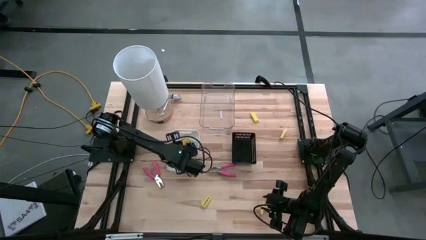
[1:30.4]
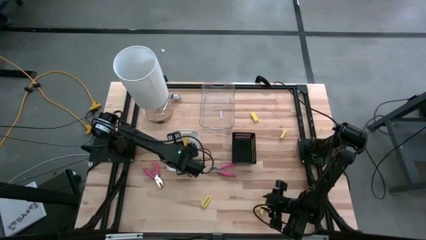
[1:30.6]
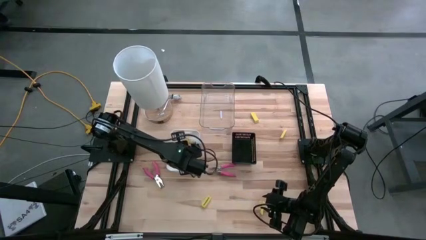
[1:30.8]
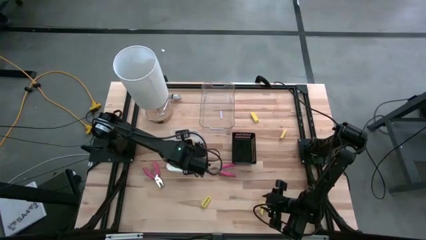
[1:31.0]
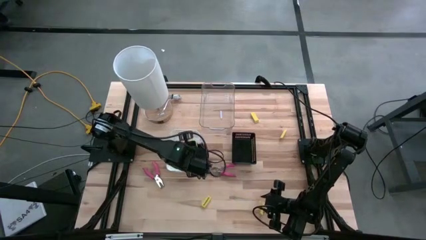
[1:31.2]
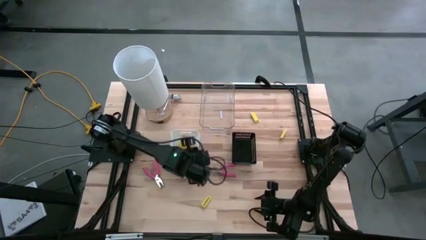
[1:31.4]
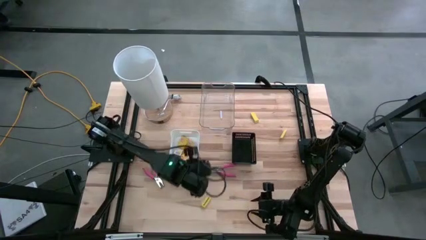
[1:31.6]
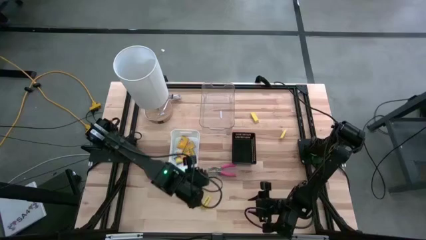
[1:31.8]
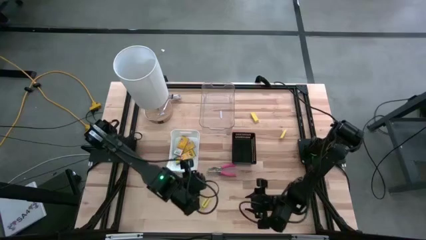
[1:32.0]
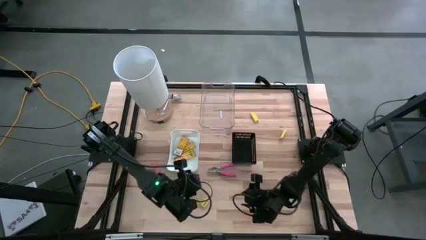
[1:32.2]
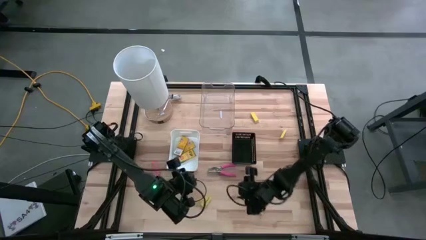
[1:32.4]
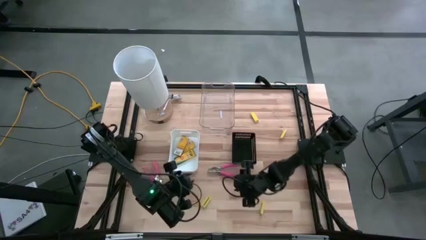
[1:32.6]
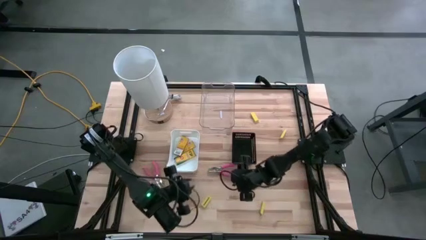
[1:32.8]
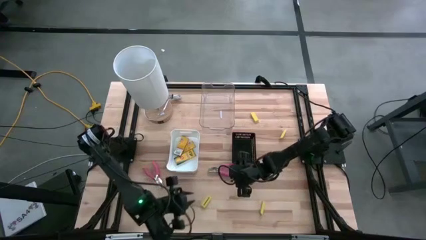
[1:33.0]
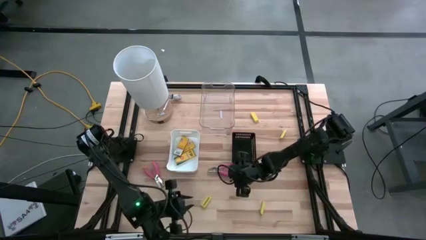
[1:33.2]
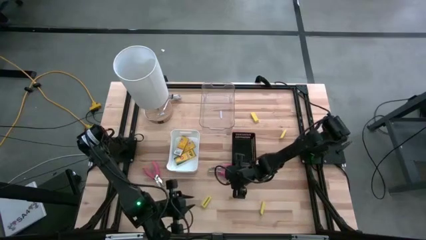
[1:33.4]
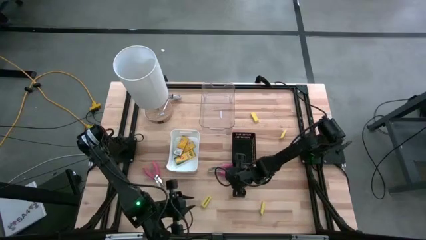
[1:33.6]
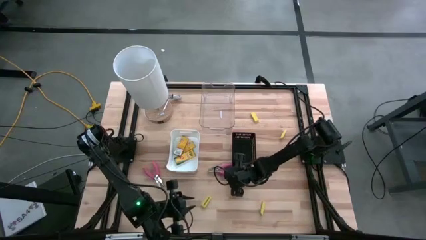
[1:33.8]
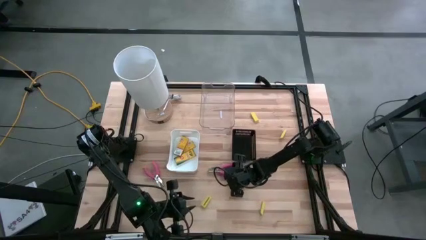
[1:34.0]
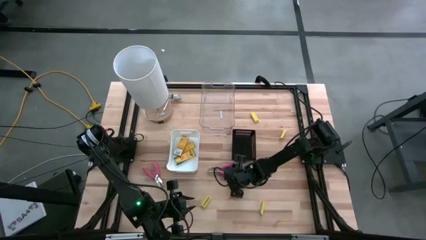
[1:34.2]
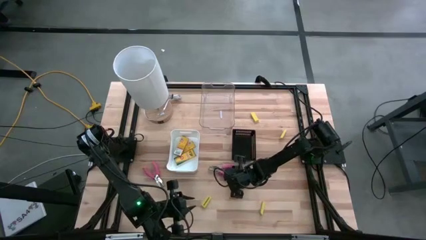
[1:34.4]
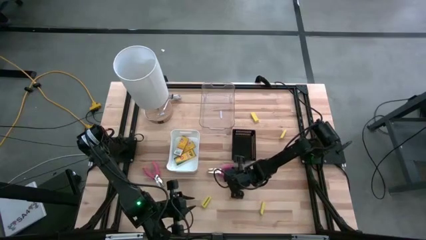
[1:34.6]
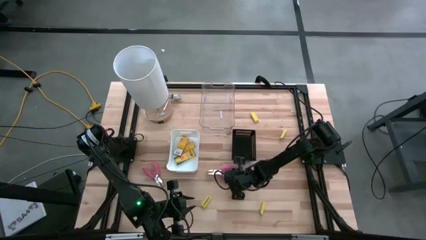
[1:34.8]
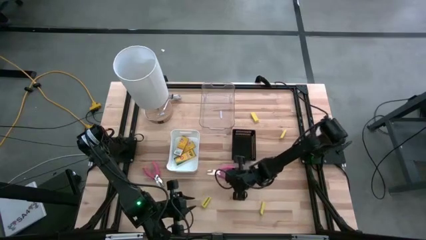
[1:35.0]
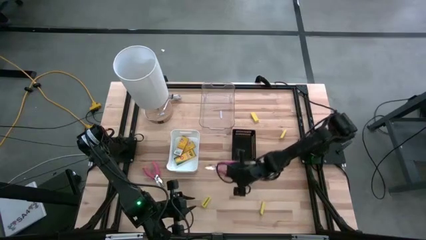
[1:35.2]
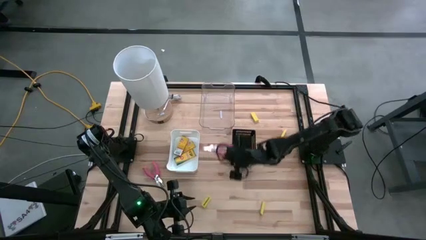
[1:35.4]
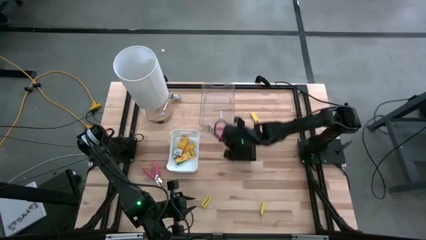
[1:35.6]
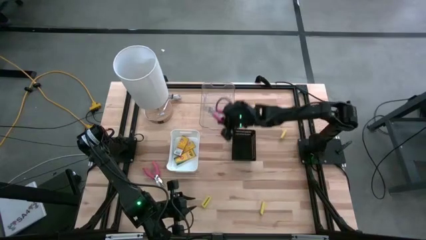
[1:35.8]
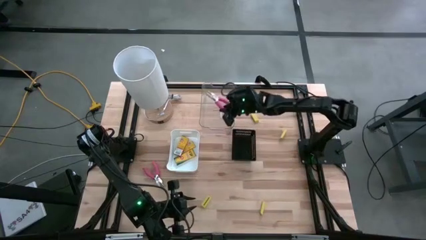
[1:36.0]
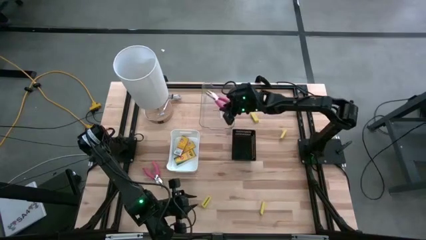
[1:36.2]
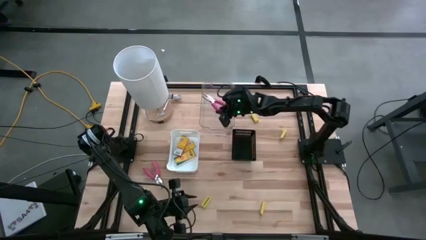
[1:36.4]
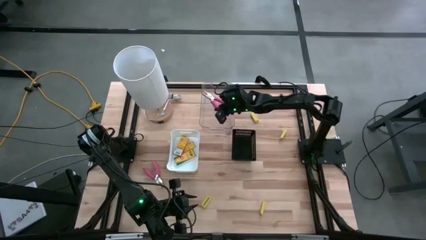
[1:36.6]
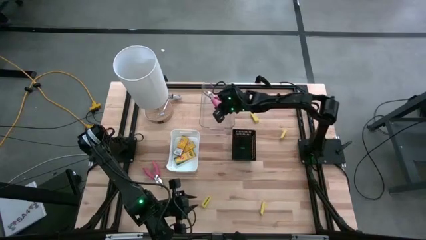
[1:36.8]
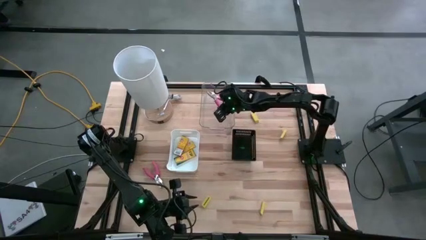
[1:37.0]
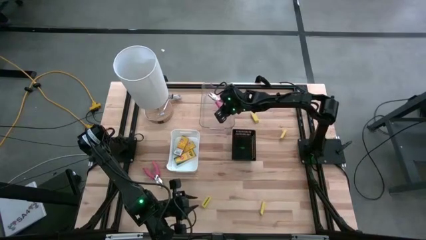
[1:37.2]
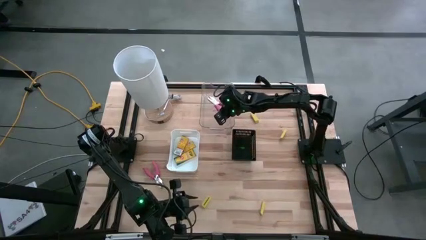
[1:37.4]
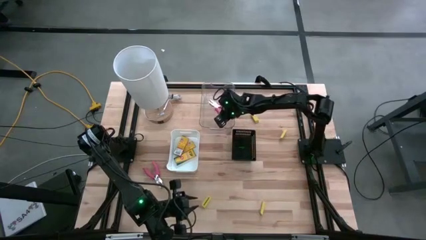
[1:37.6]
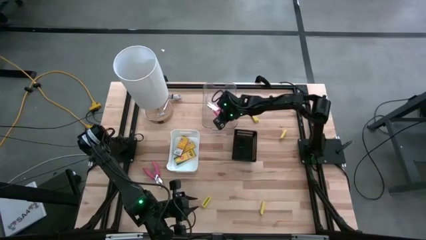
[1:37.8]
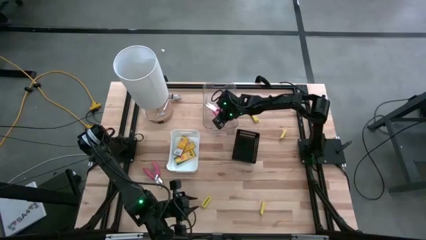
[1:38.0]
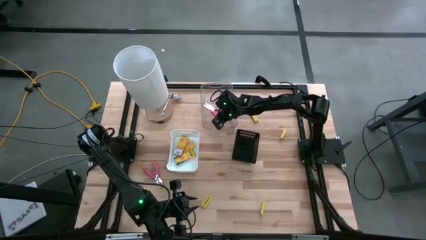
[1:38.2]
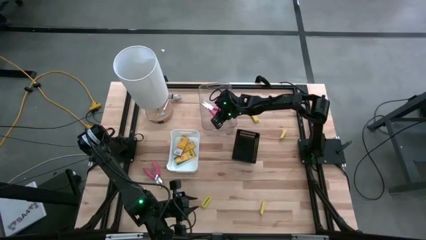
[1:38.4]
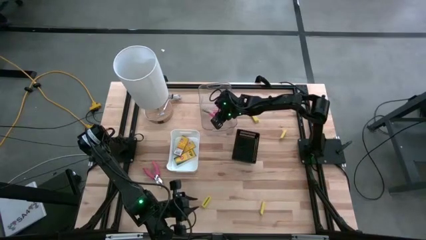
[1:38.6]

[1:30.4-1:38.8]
Task: Pick & Place School Supplies
Put the right hole puncher into the transparent bin

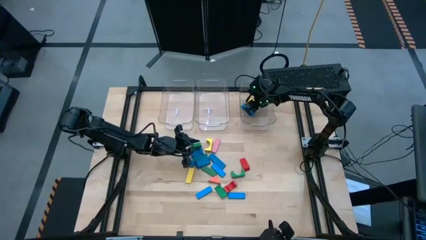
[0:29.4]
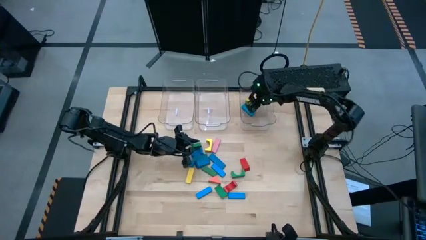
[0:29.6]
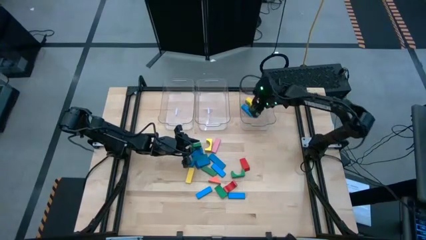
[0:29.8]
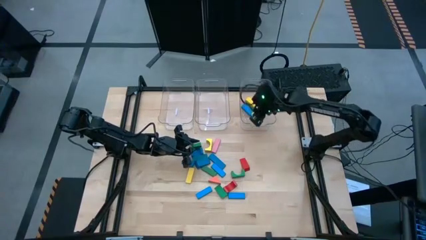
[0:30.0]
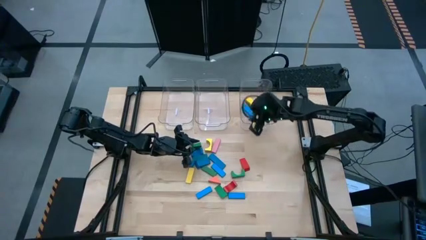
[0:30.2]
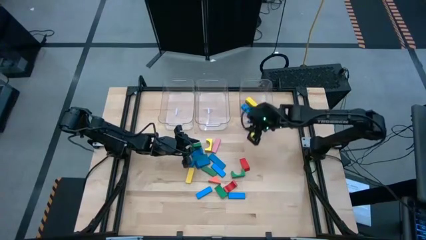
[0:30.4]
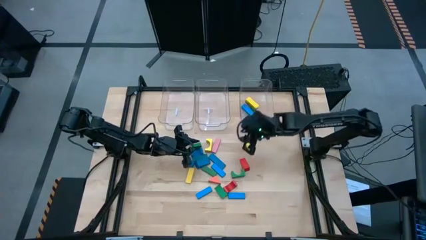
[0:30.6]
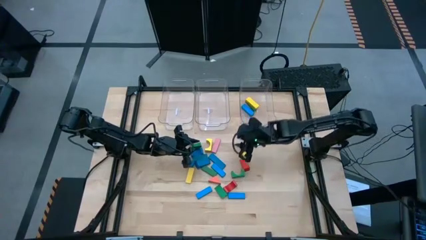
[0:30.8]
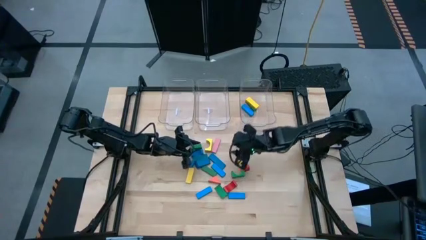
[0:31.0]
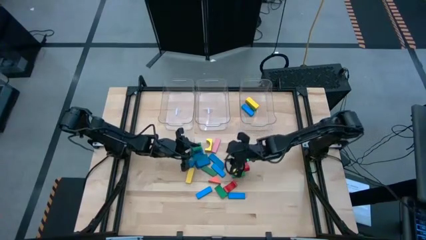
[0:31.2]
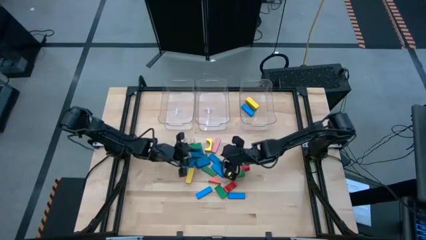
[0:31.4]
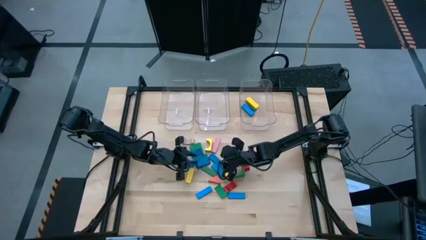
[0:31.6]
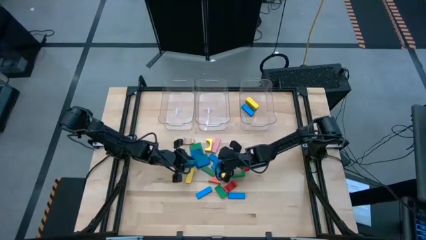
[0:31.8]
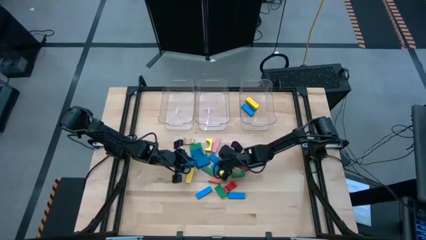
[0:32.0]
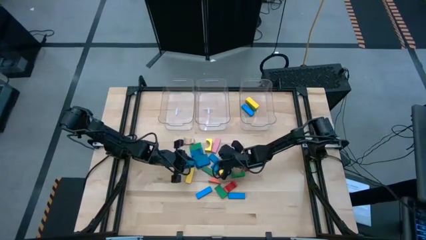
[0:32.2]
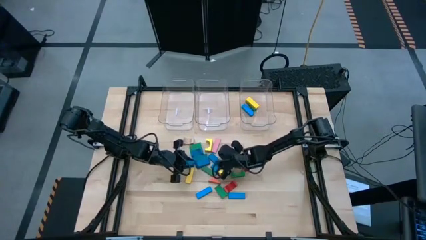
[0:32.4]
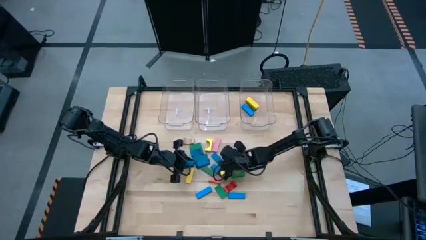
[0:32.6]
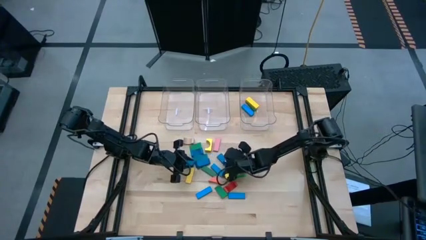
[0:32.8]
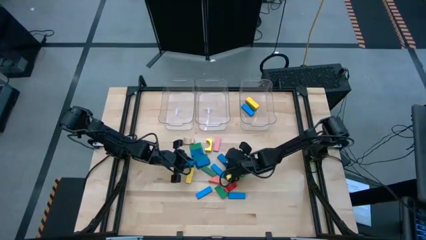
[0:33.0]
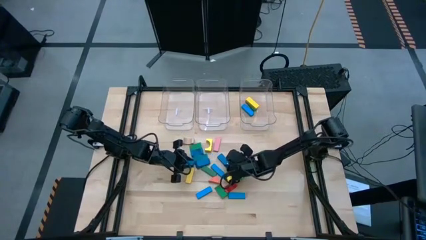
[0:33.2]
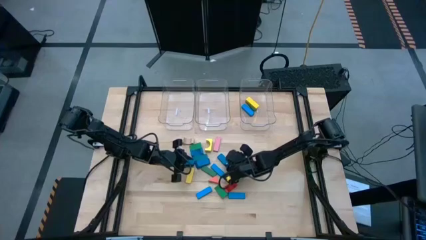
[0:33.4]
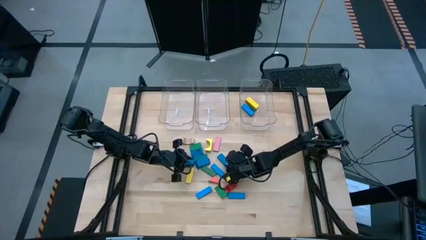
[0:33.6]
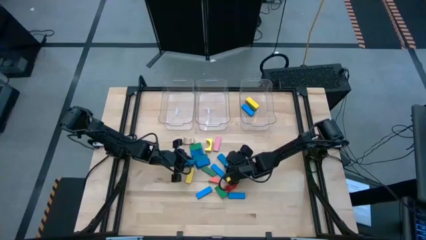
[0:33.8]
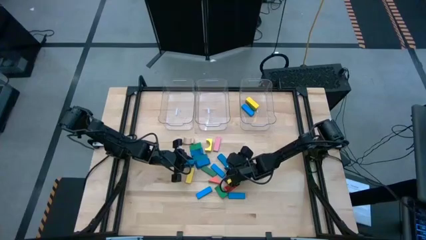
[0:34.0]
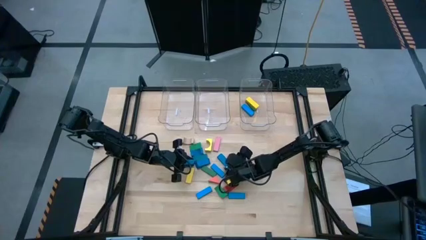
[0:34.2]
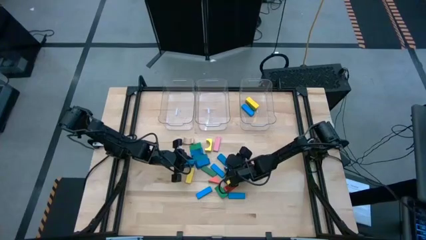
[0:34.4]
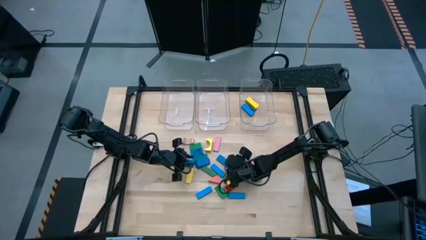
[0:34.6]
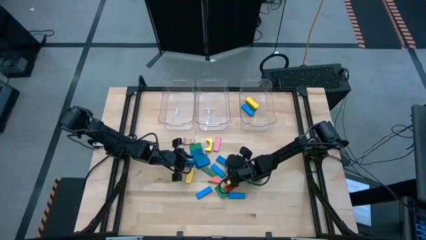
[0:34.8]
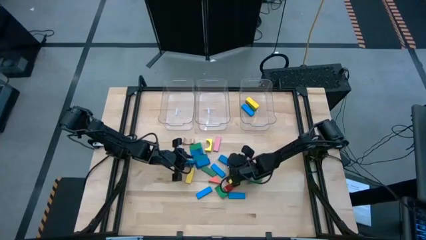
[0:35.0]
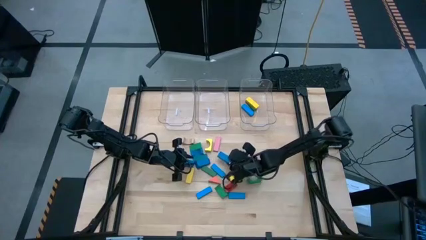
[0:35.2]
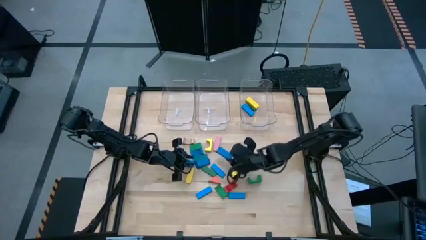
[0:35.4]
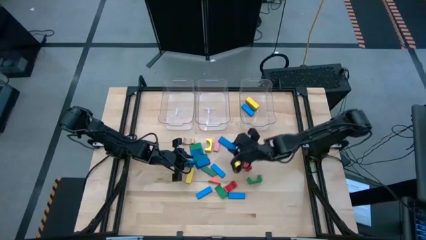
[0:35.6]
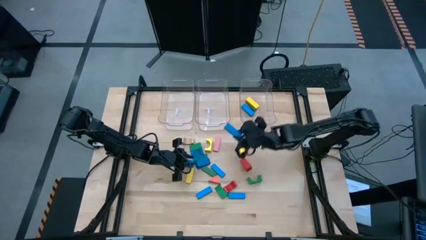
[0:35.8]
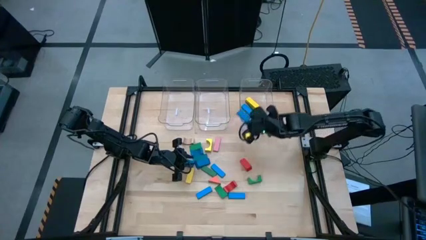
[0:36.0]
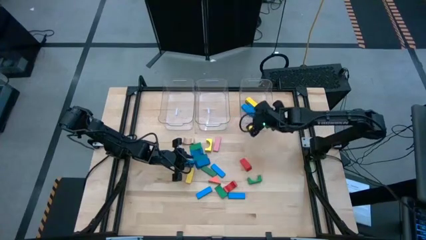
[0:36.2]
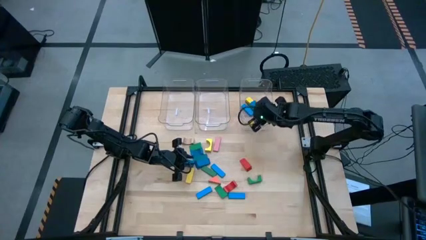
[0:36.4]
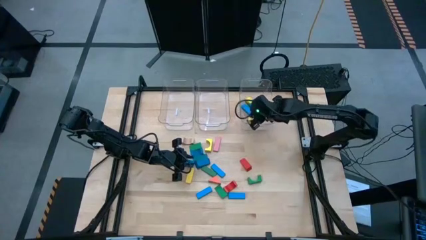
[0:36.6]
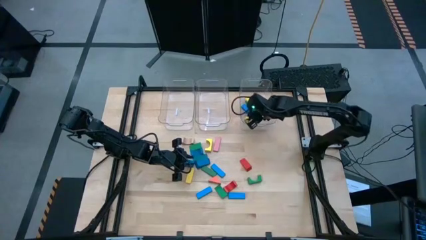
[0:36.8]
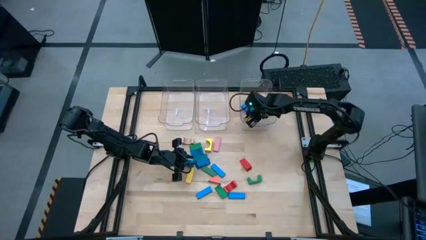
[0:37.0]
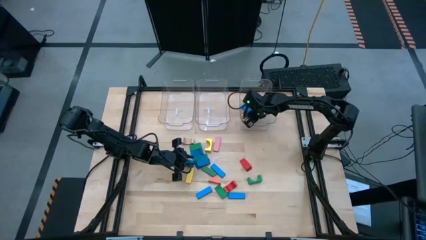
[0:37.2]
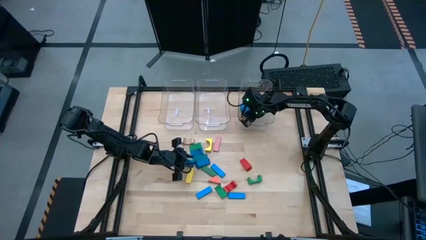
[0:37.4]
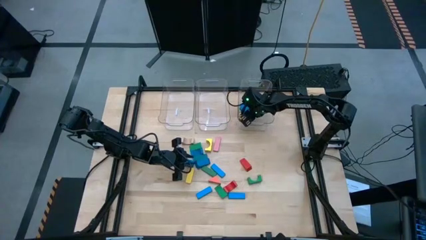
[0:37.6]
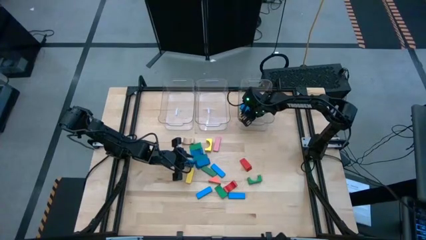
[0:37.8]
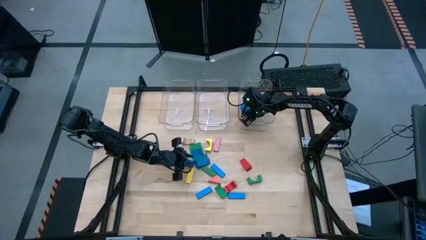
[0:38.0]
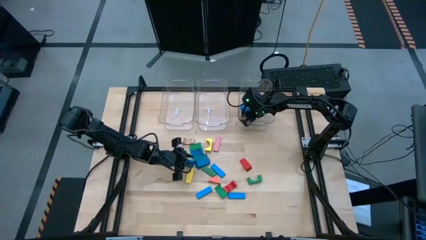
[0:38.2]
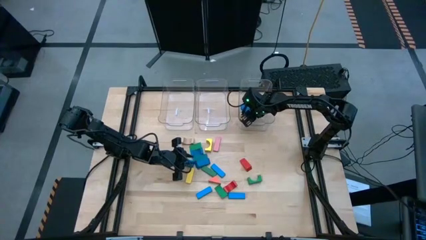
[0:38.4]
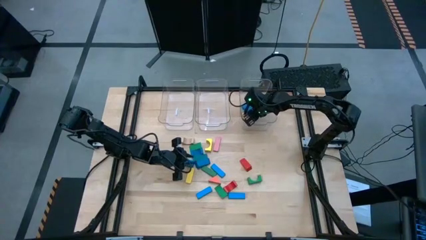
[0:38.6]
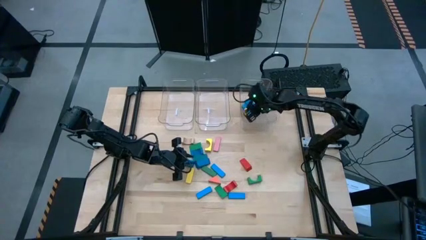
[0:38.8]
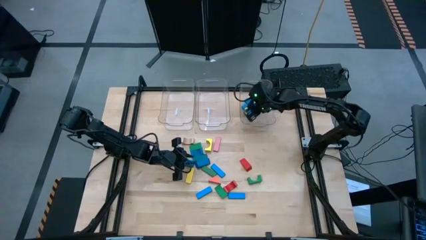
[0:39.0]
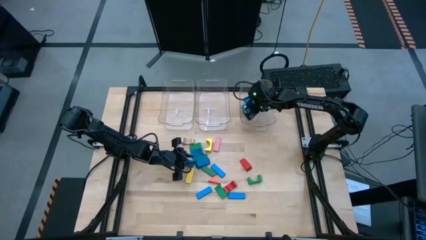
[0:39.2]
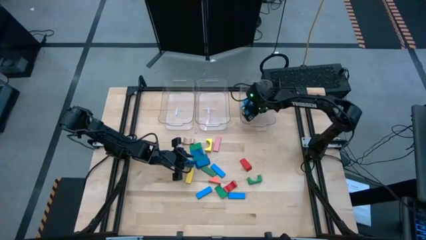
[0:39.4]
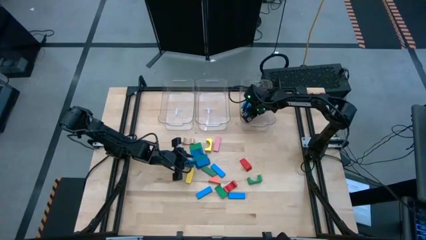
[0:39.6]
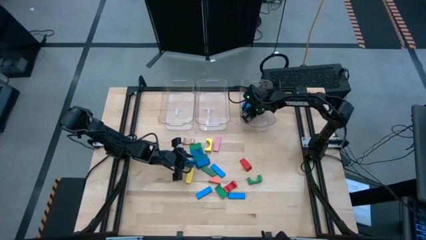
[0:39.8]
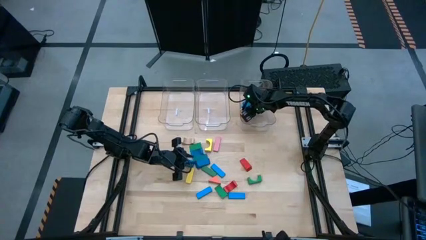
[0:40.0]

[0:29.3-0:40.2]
Task: Sort blocks by size
Put the dark blue rectangular block into the right transparent bin
